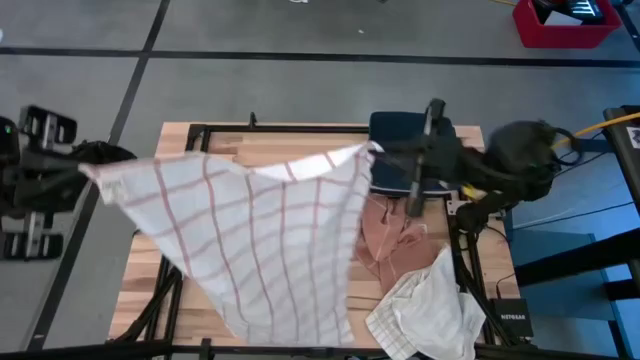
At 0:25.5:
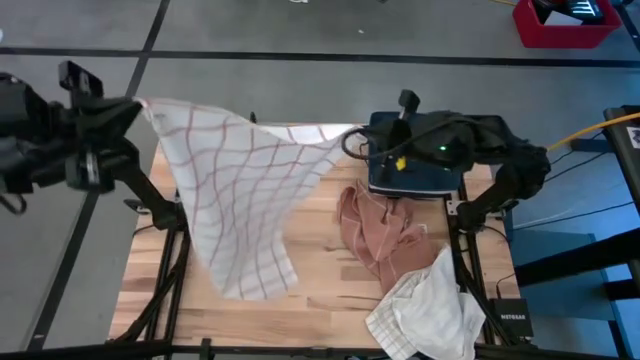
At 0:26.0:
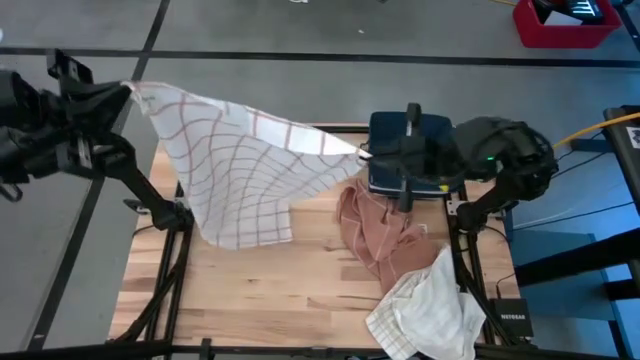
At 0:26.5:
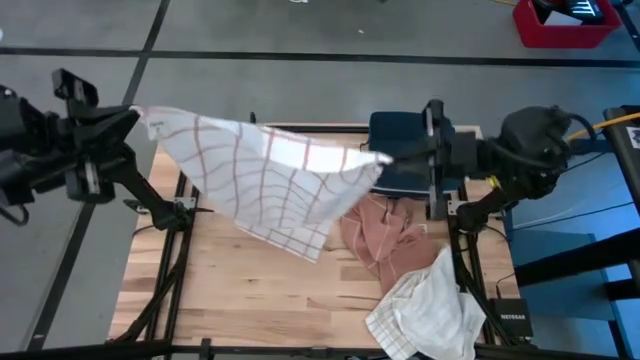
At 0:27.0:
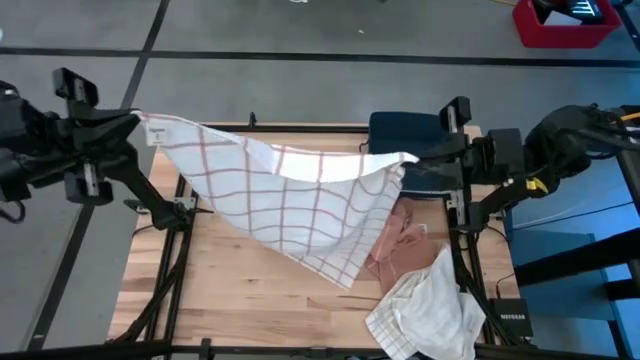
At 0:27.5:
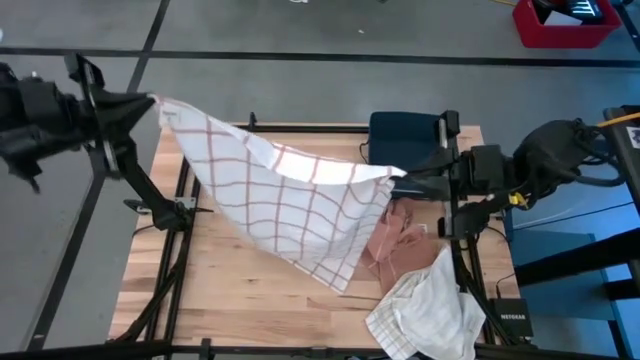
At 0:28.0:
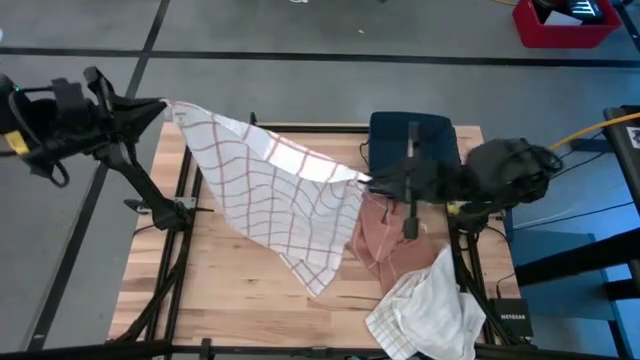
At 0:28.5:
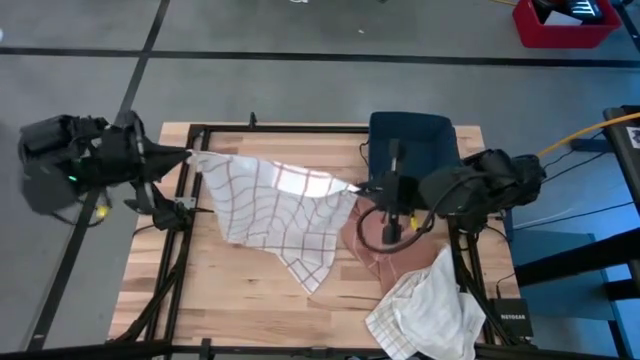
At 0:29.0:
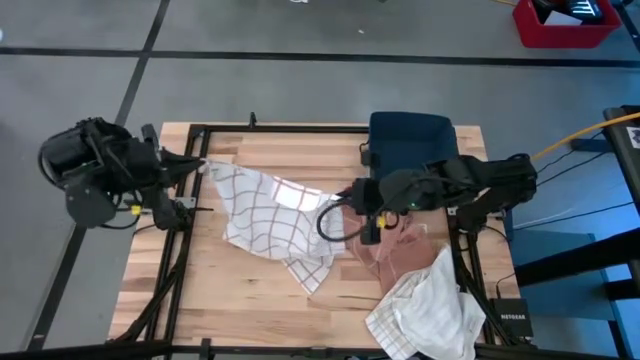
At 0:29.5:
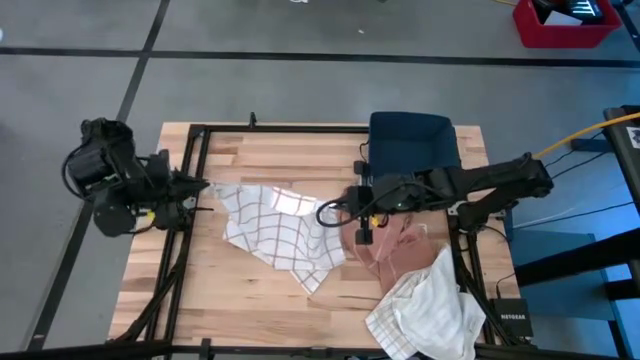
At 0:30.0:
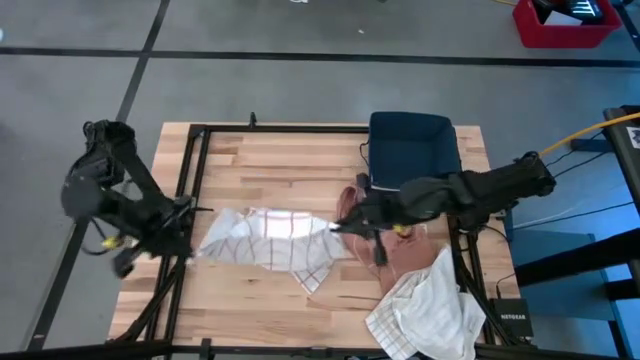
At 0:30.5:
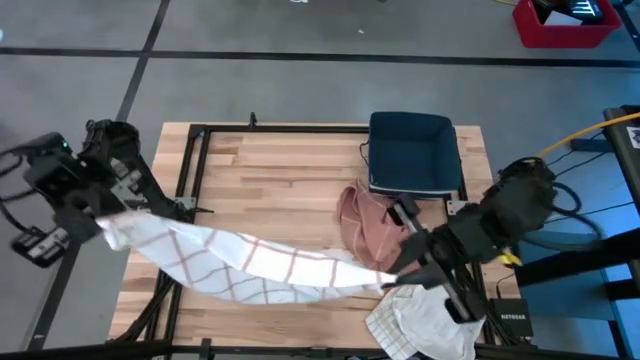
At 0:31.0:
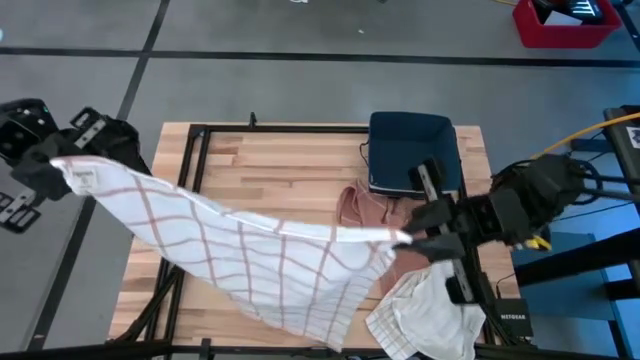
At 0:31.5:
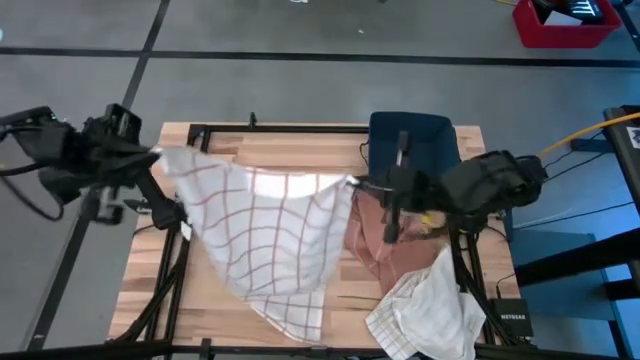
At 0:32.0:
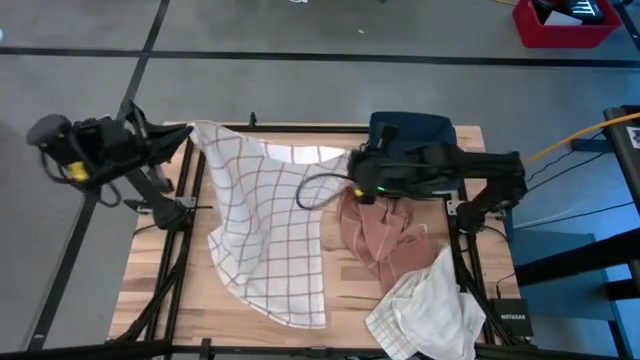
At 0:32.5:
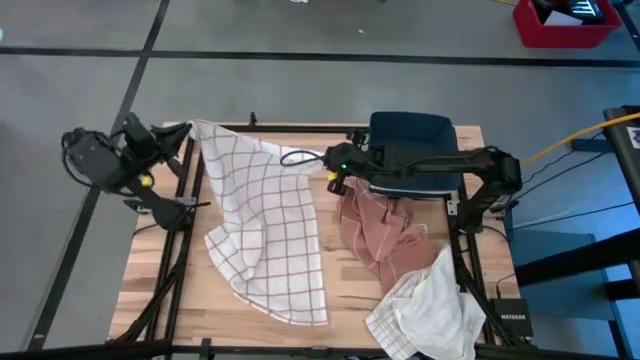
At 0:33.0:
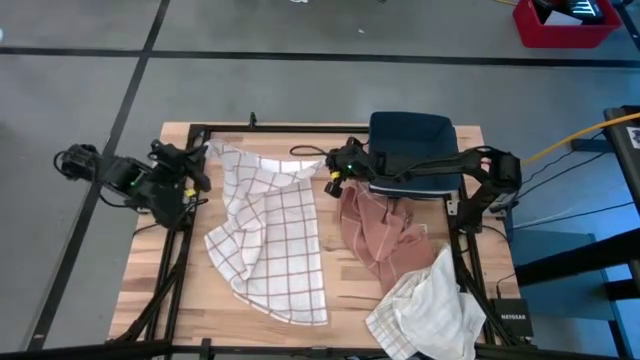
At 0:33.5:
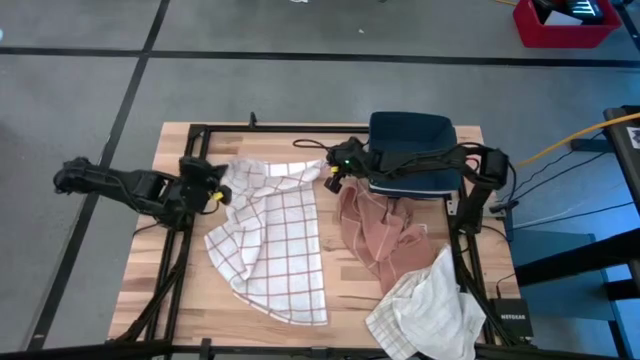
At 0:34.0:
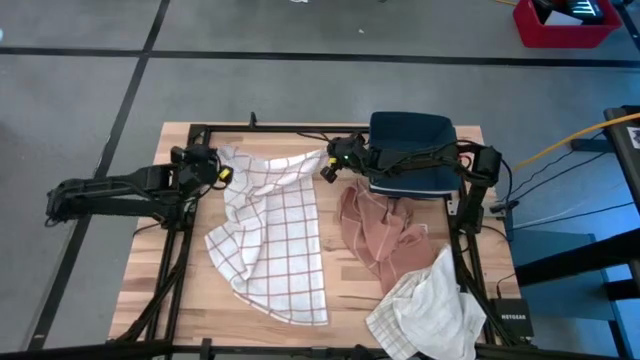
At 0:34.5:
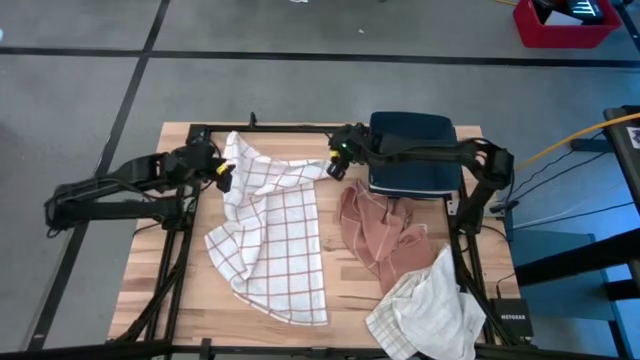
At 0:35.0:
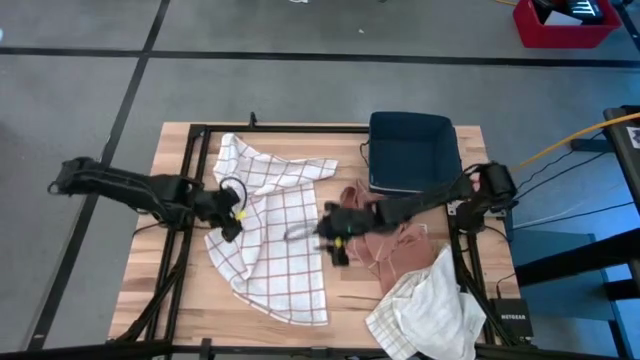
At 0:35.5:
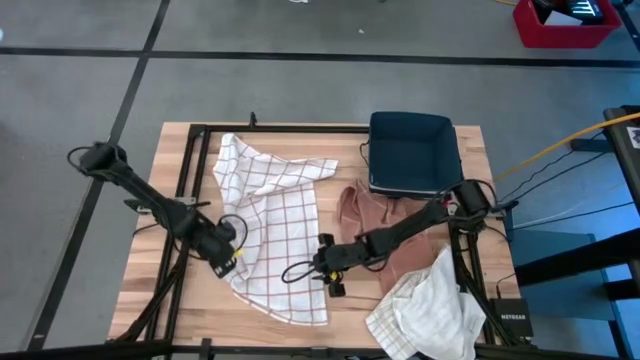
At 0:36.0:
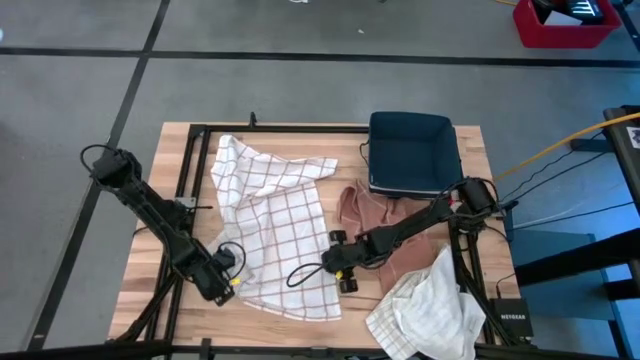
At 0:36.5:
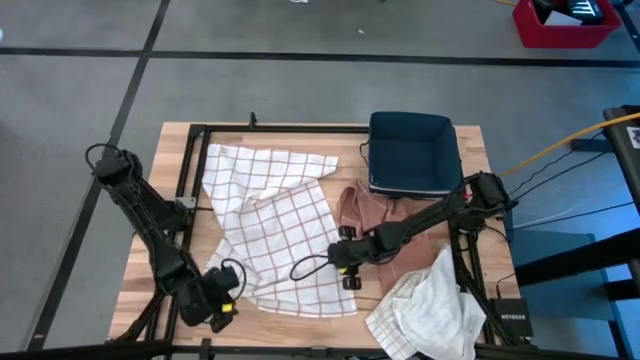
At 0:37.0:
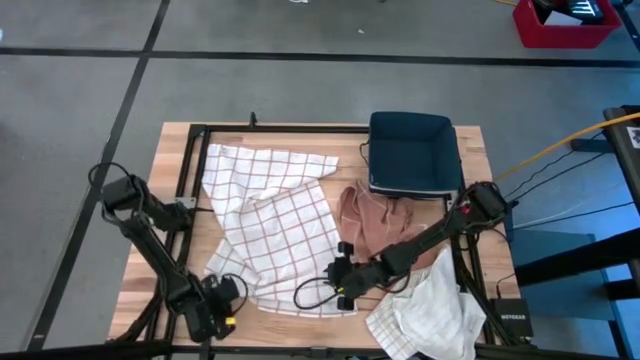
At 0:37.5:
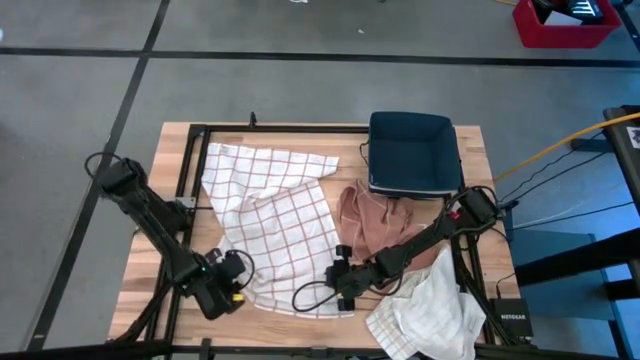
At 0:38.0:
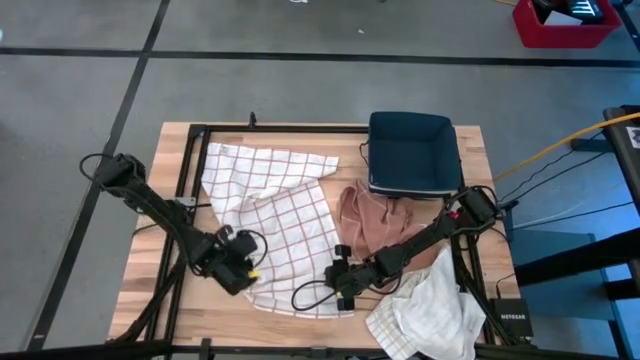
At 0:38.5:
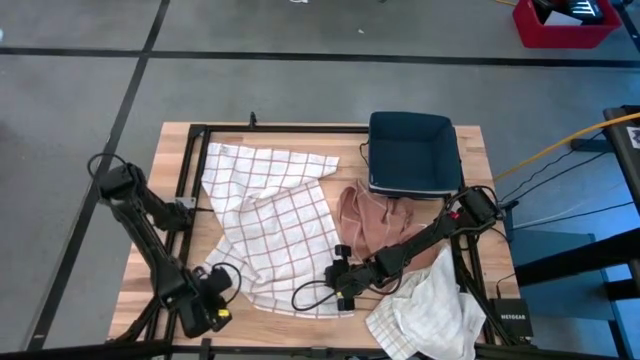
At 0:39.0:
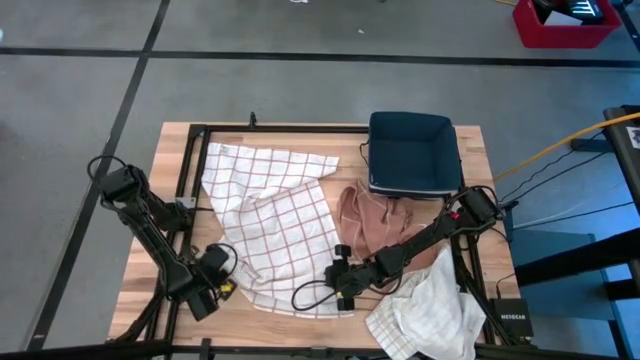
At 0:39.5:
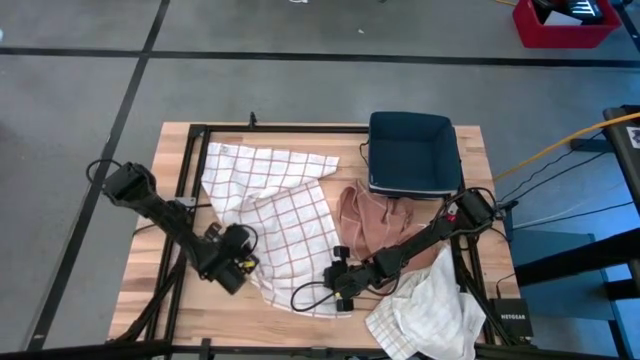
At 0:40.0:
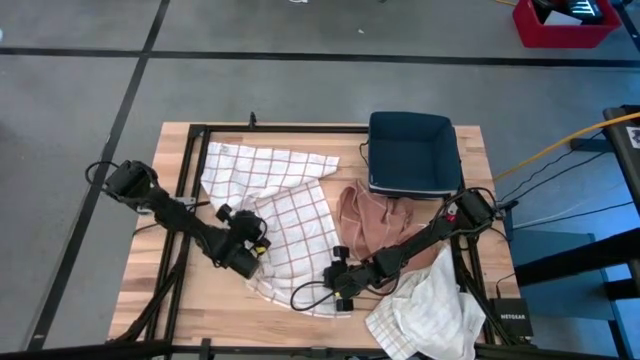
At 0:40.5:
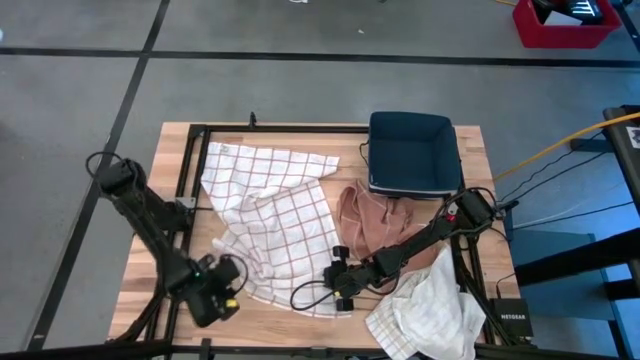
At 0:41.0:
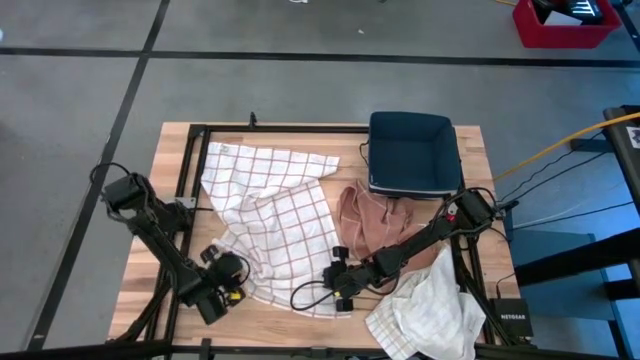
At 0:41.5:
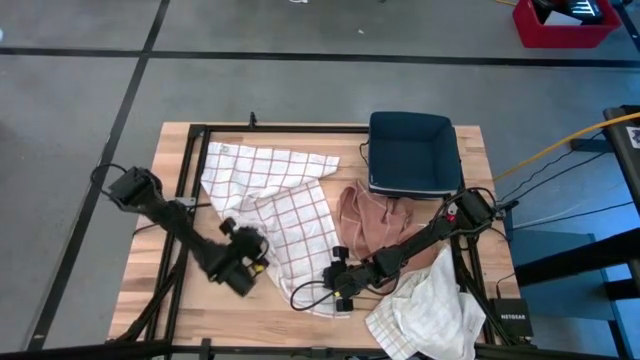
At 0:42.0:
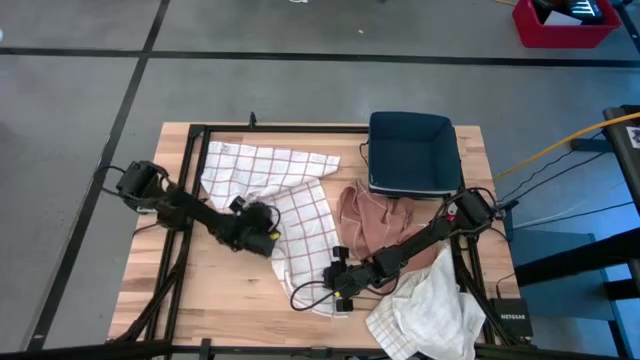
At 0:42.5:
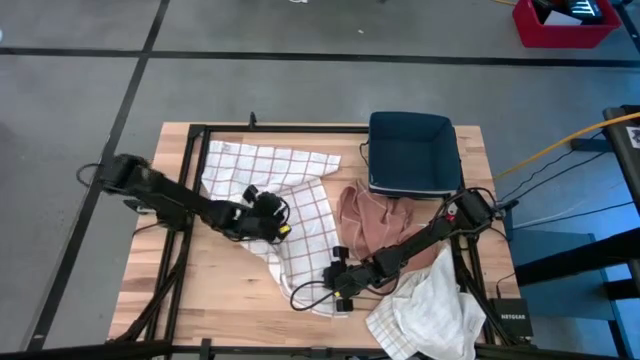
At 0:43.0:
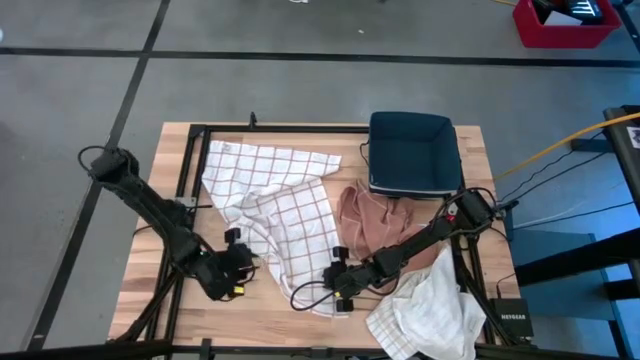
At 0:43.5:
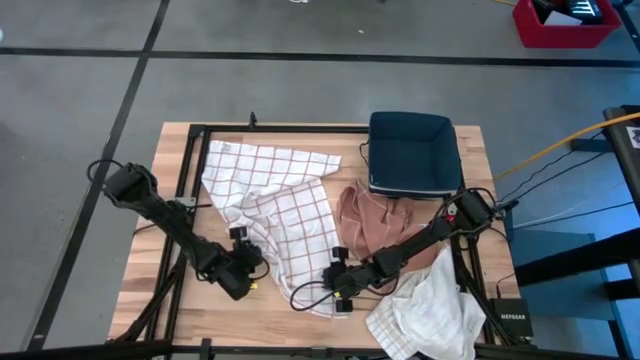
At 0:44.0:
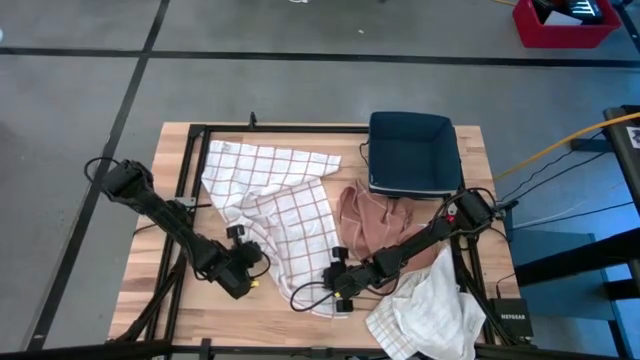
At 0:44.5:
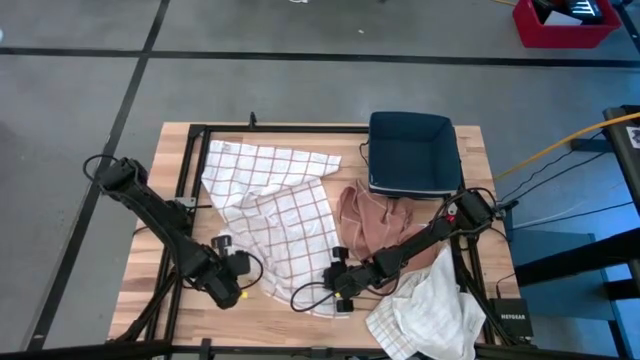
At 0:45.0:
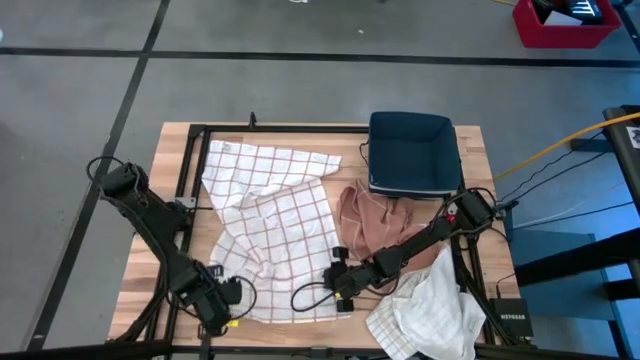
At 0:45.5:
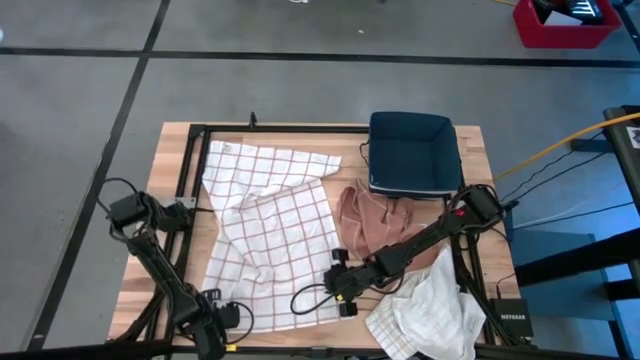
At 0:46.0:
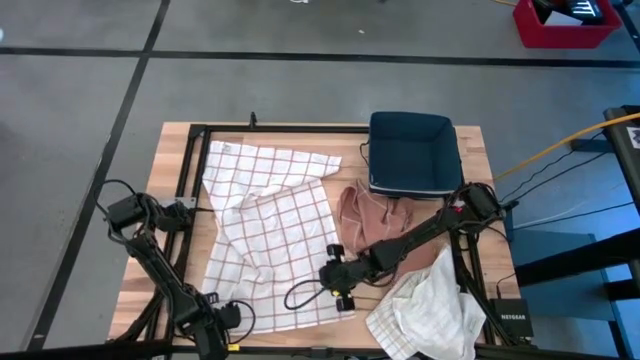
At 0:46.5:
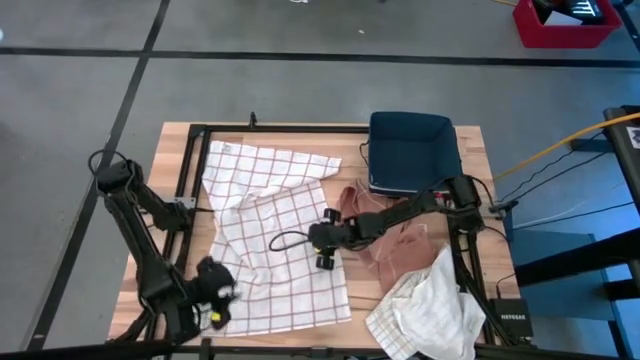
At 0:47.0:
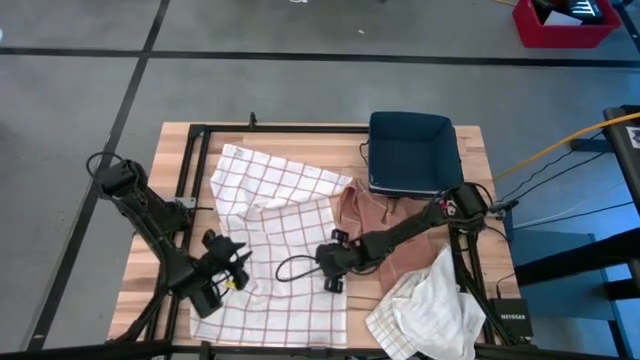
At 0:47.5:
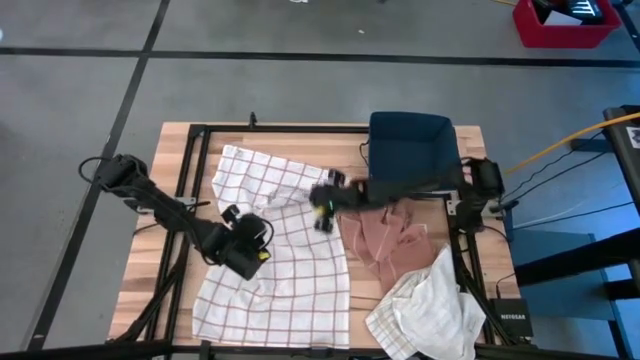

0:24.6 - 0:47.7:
Task: Fold towel
Fold the brown striped towel on the table
